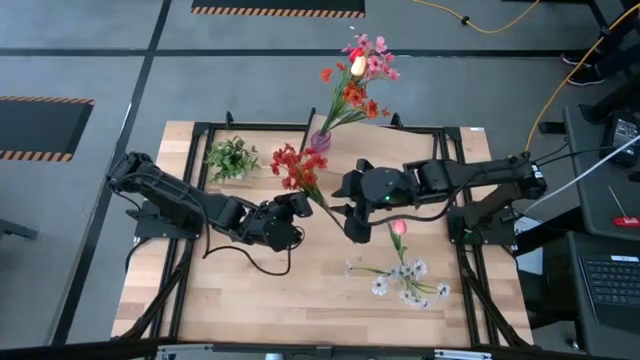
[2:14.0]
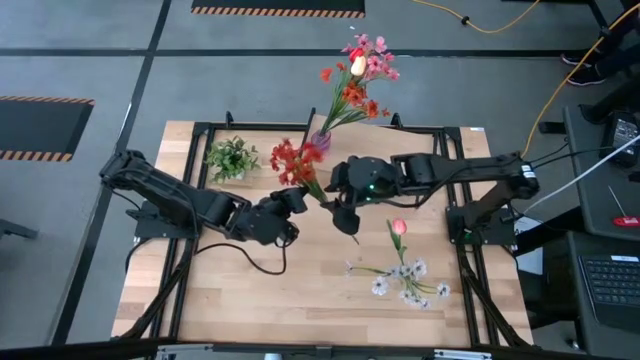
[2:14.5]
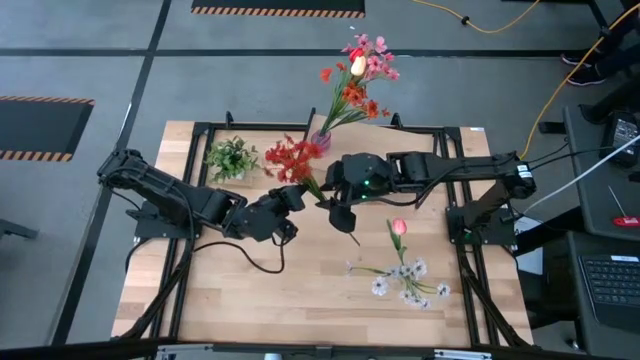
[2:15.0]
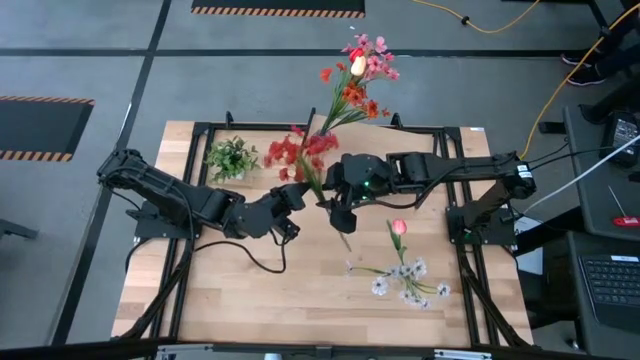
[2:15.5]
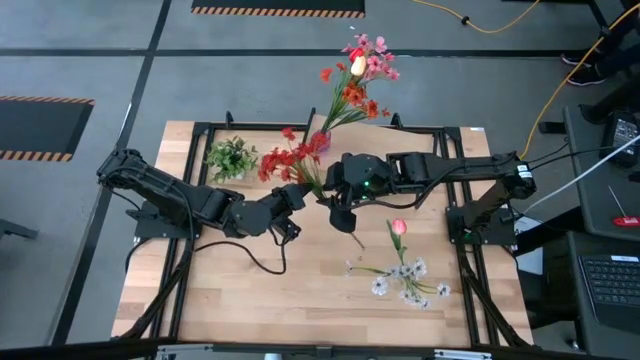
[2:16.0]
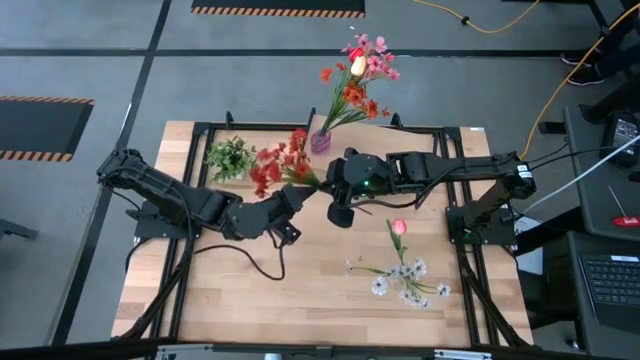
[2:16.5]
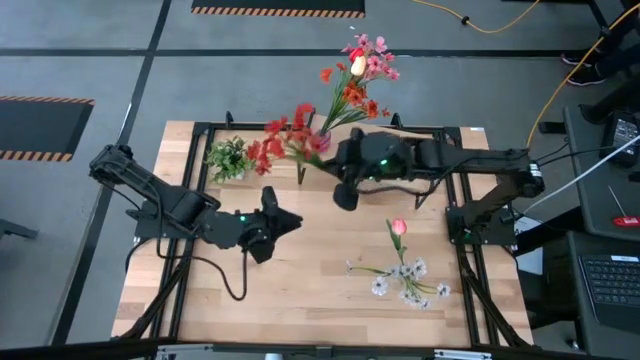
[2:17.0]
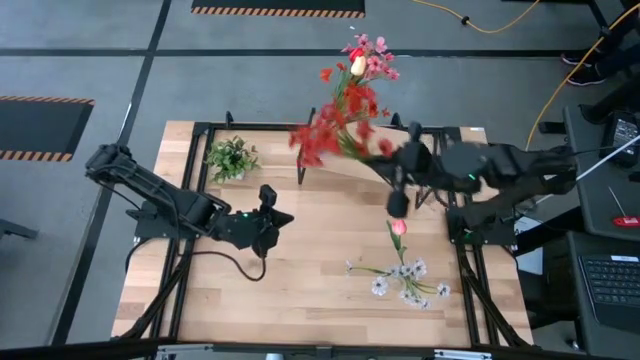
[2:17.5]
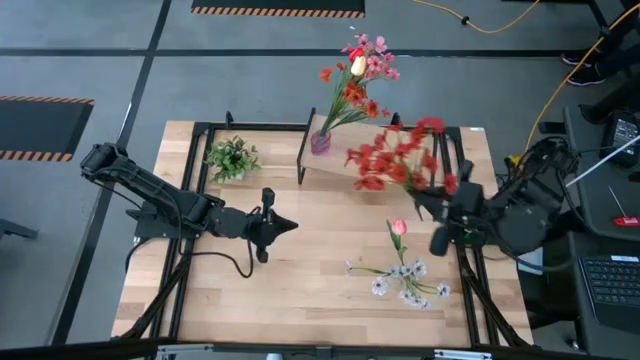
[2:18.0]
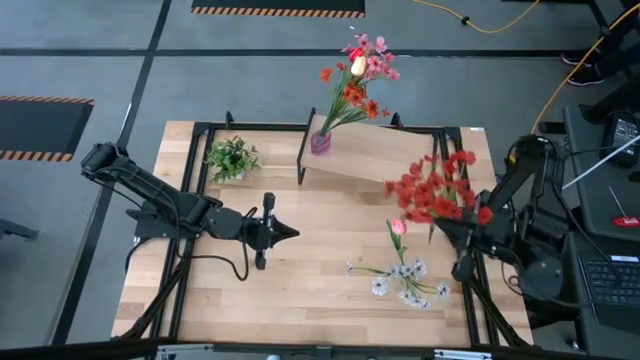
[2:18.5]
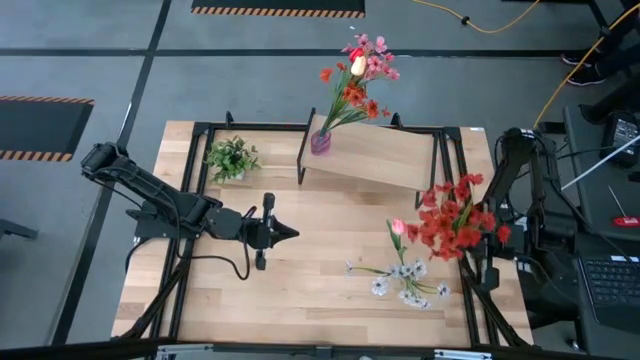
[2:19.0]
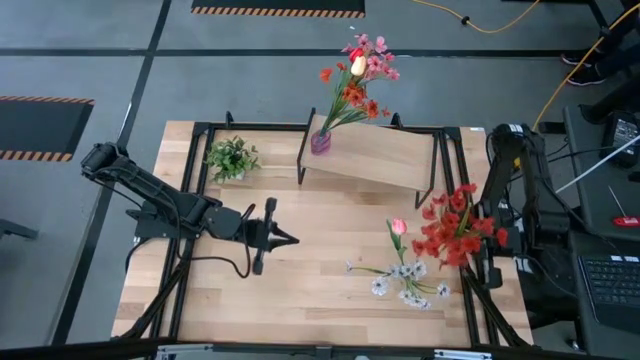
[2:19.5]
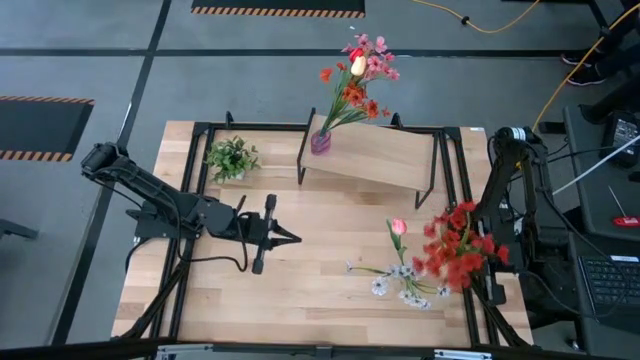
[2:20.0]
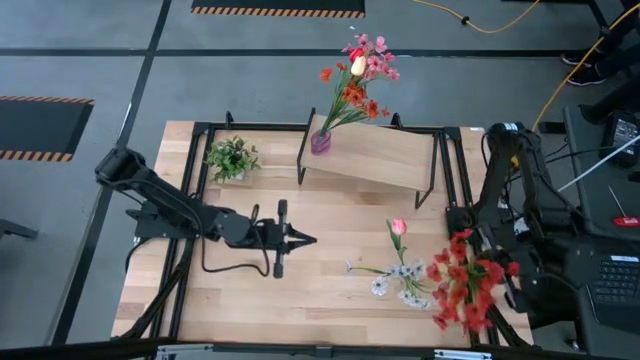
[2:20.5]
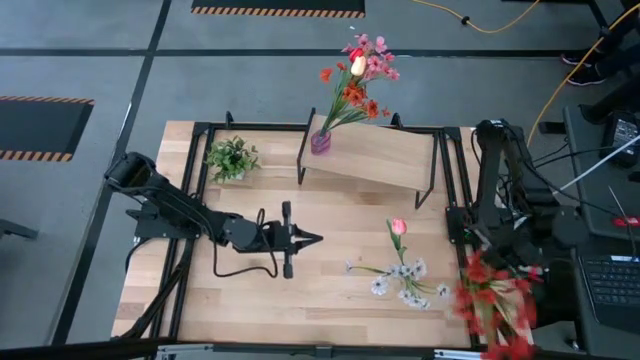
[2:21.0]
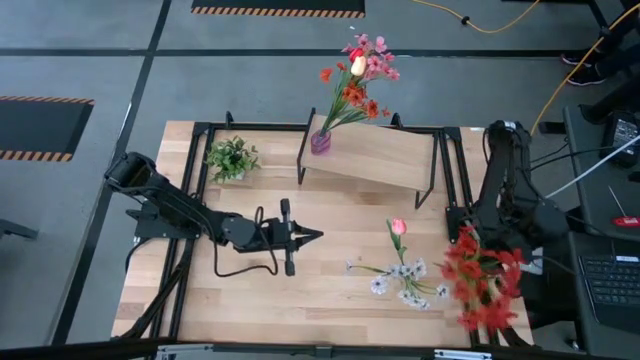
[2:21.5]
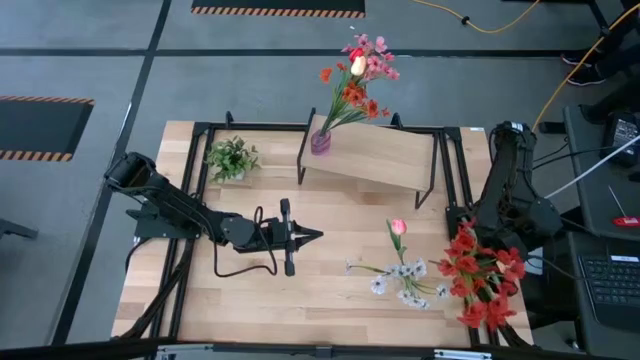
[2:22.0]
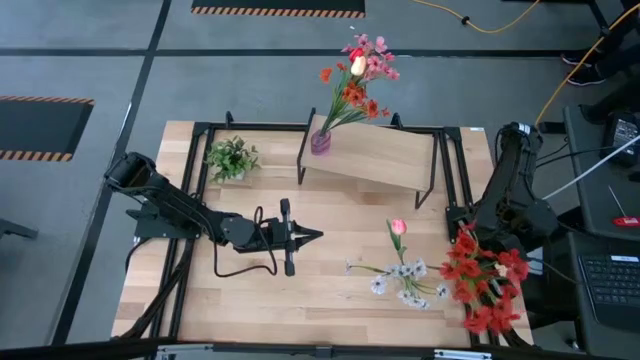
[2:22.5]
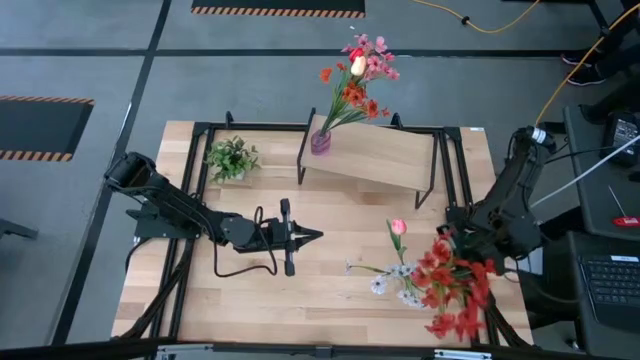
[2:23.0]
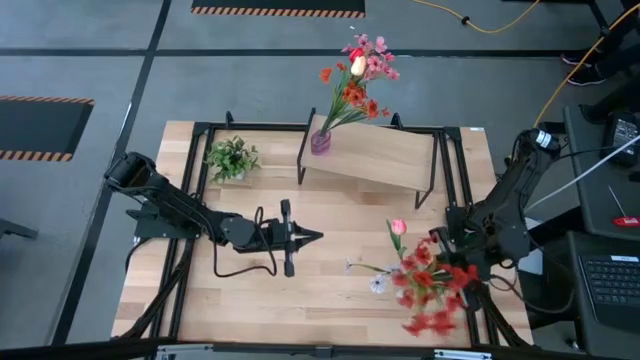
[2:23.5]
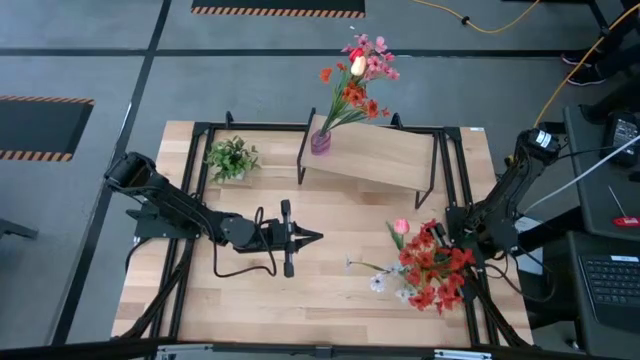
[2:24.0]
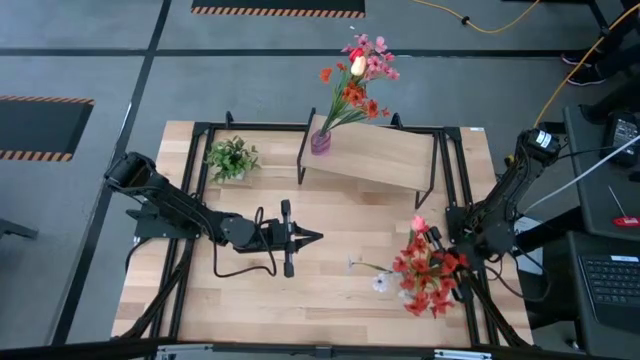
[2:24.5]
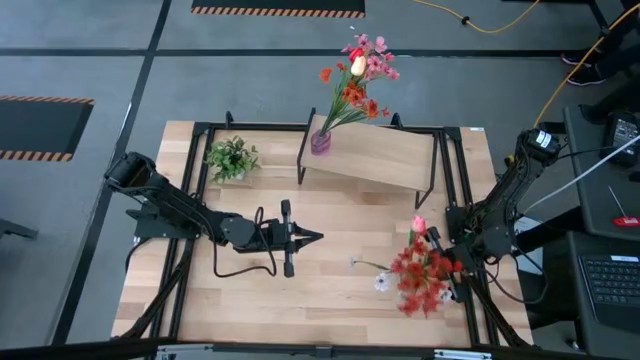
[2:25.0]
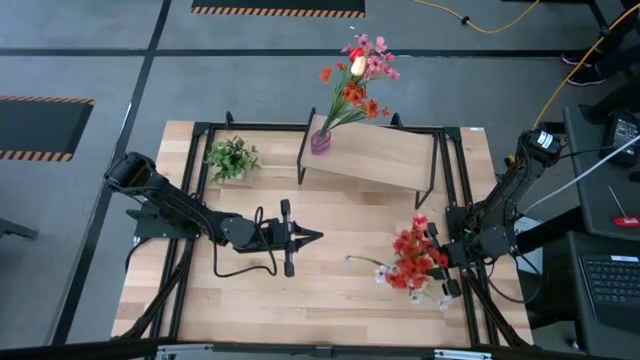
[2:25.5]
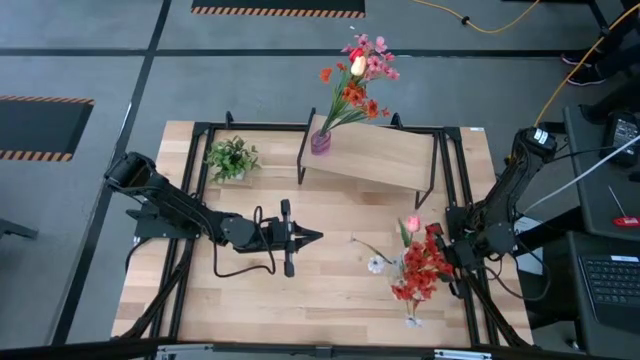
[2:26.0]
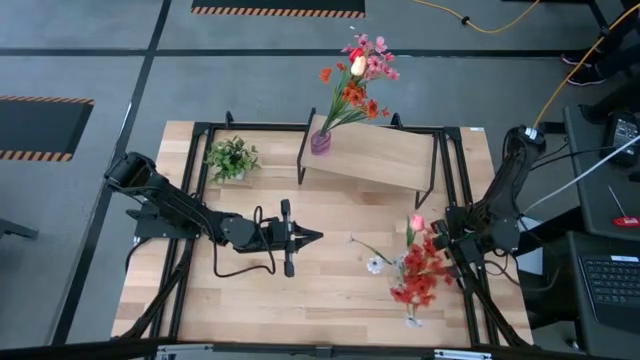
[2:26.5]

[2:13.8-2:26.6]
Task: Pick and place flowers into a vace then onto a shelf
Put the orange flowers into the transparent vase

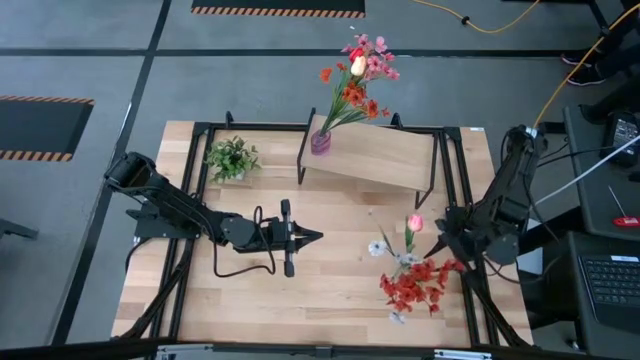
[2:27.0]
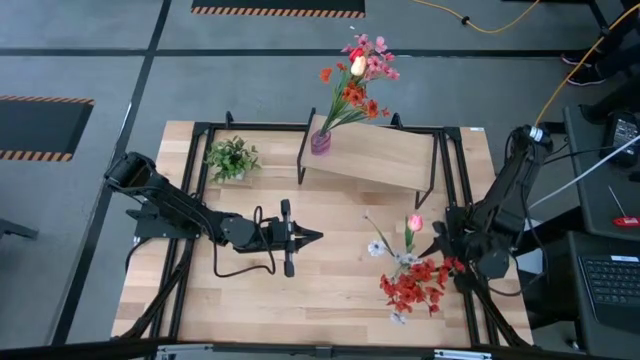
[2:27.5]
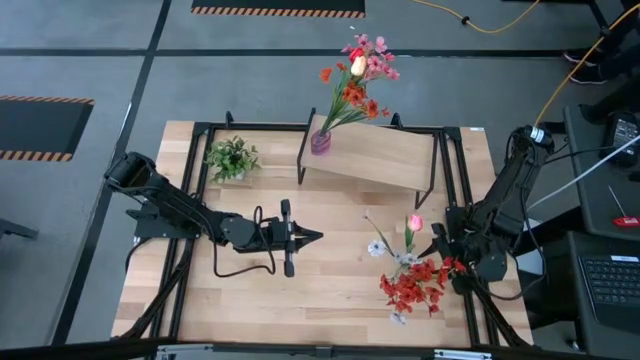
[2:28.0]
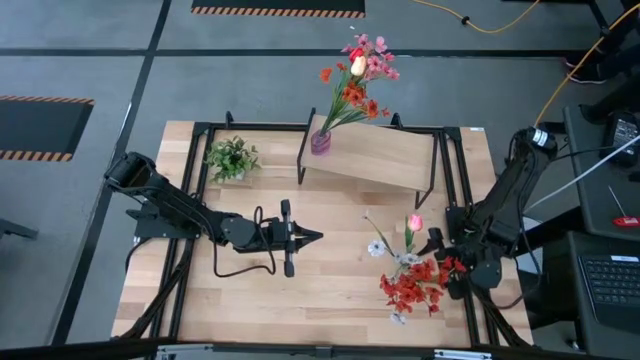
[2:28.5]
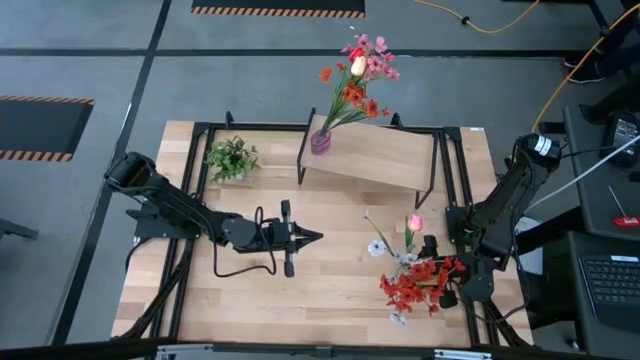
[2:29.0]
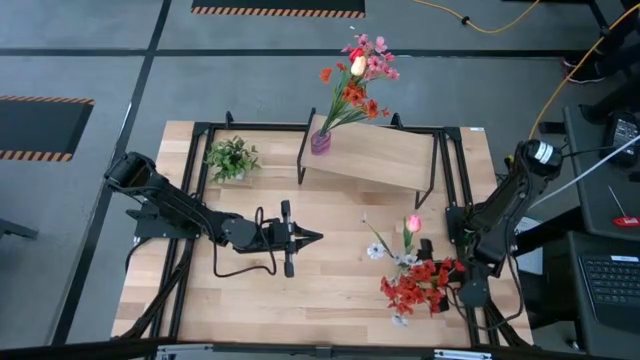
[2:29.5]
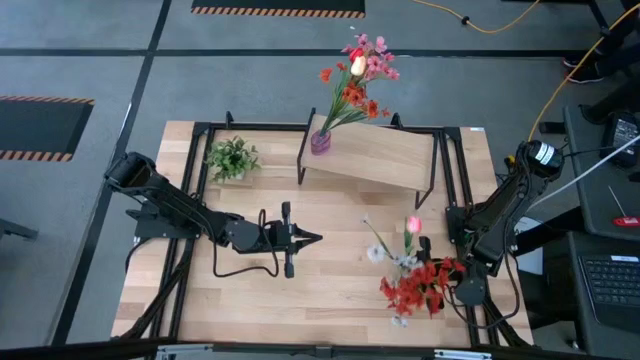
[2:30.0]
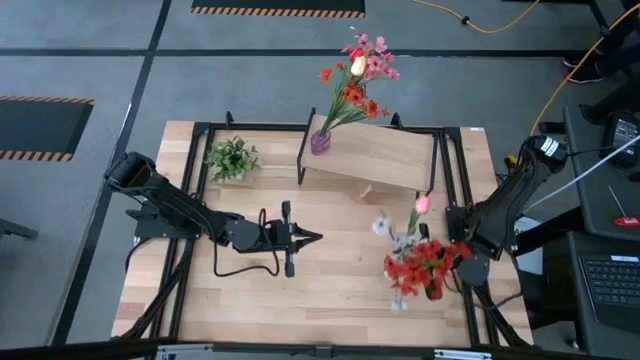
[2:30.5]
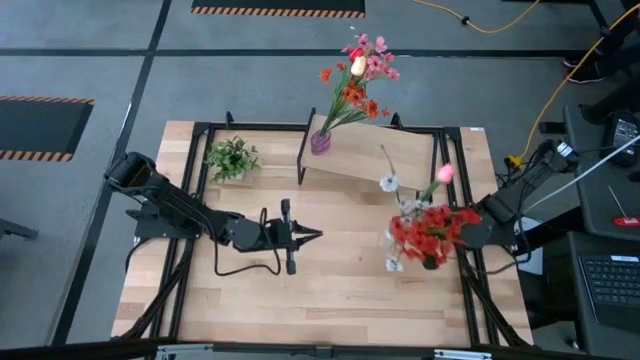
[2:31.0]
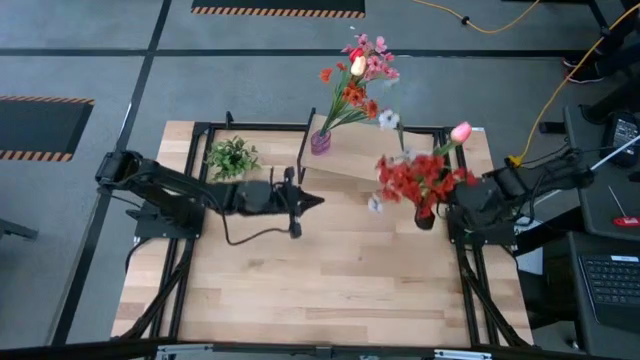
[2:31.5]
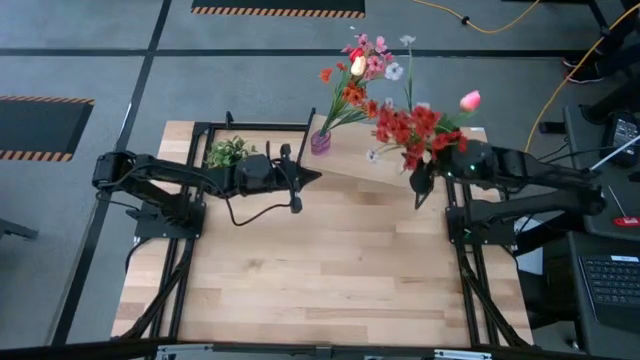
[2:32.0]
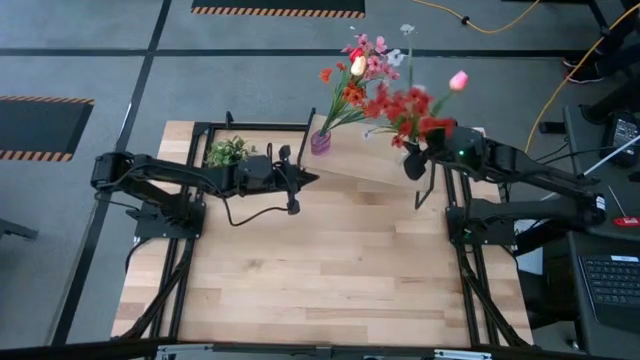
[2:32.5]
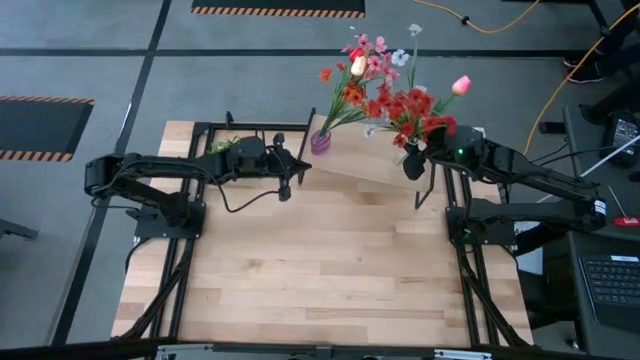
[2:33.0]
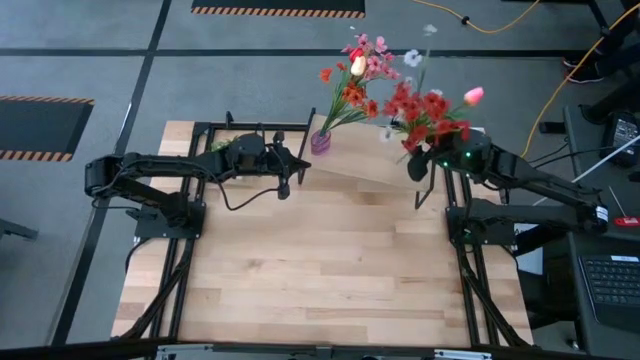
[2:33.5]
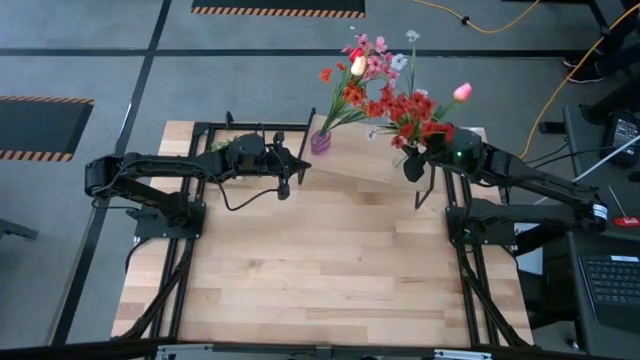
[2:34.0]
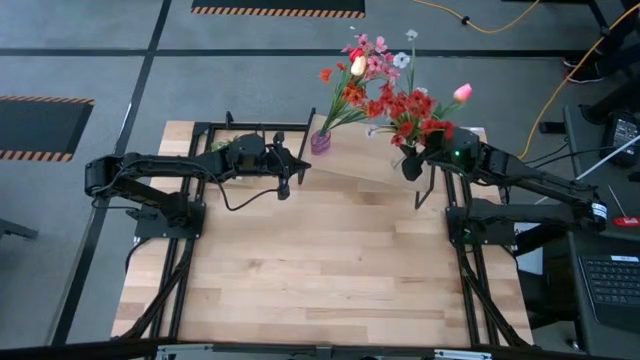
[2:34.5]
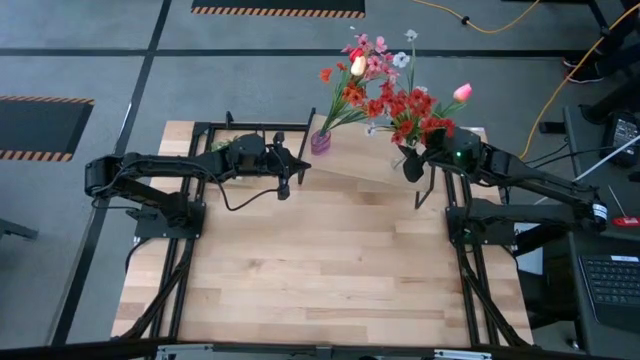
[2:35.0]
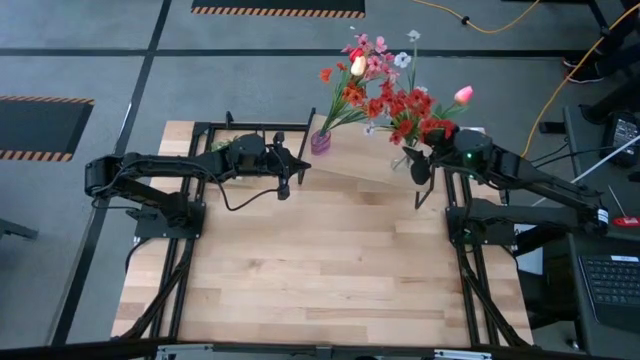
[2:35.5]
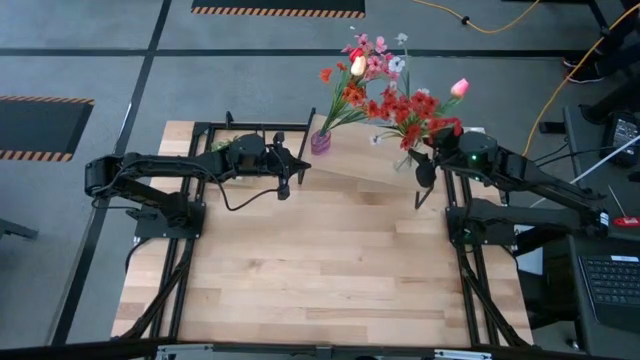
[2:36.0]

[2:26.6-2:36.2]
Put the transparent vase with the flowers on the shelf
